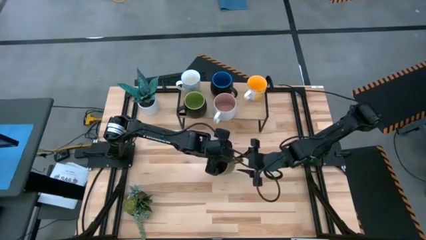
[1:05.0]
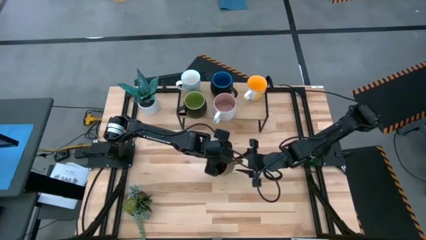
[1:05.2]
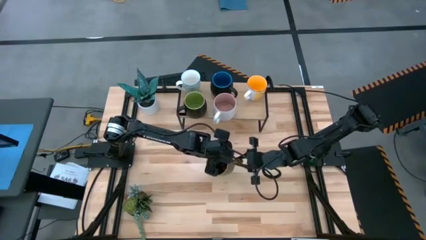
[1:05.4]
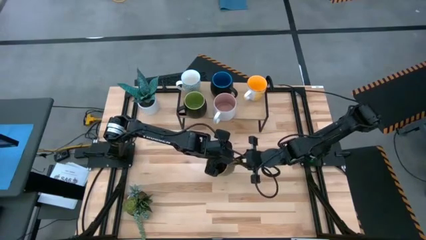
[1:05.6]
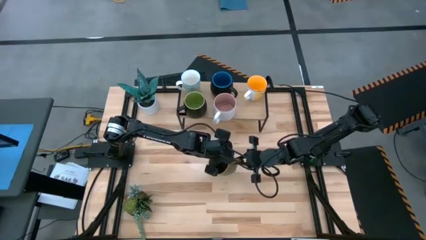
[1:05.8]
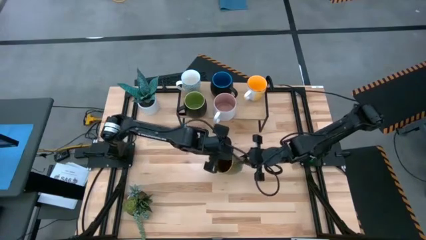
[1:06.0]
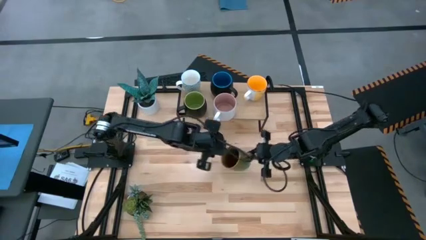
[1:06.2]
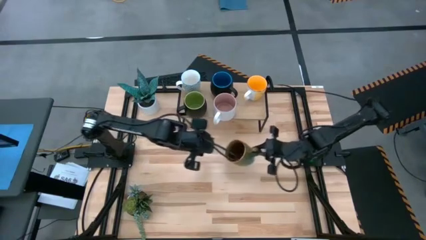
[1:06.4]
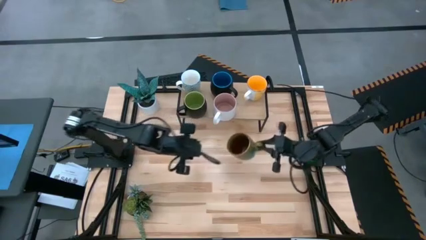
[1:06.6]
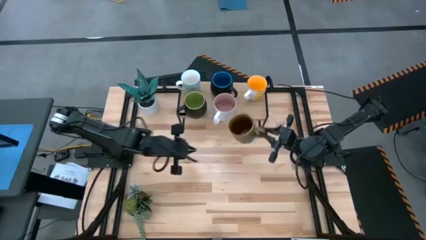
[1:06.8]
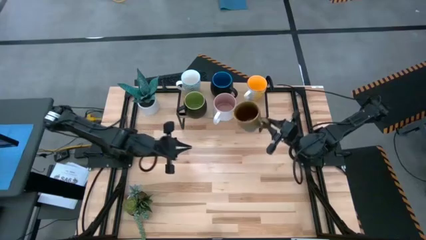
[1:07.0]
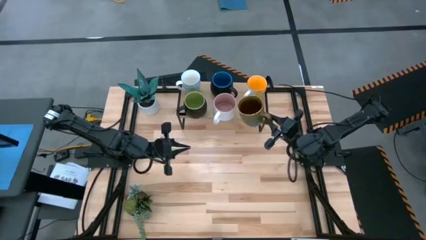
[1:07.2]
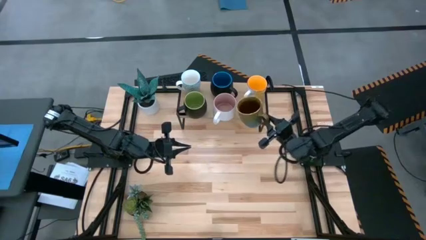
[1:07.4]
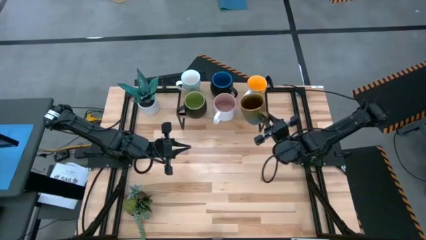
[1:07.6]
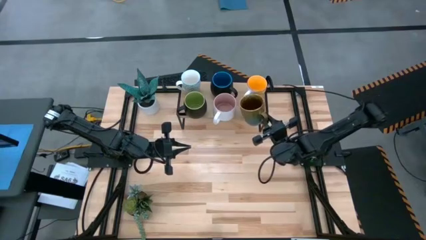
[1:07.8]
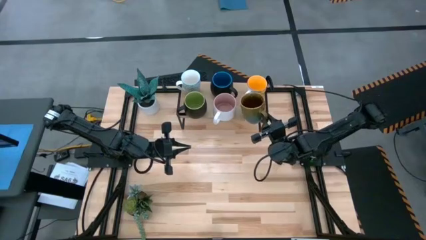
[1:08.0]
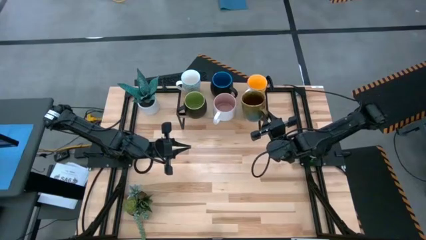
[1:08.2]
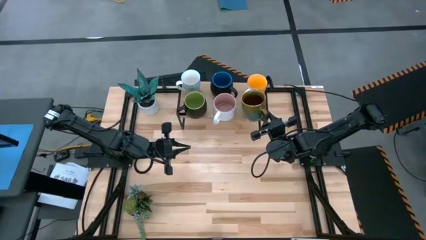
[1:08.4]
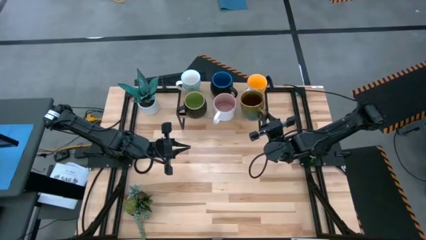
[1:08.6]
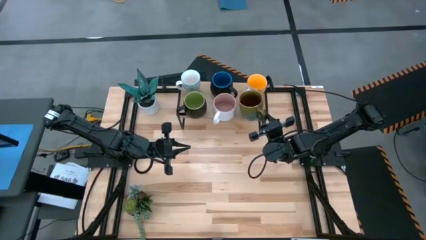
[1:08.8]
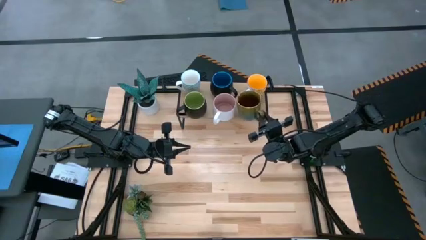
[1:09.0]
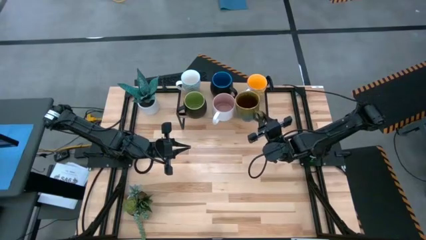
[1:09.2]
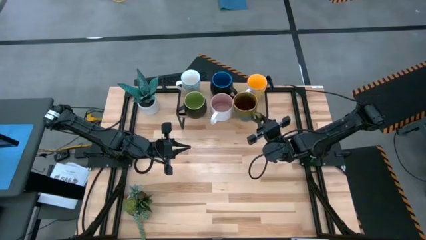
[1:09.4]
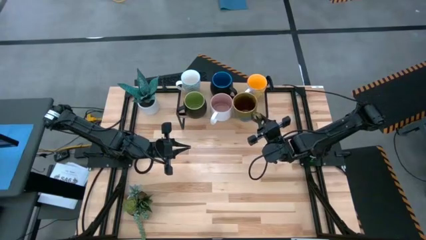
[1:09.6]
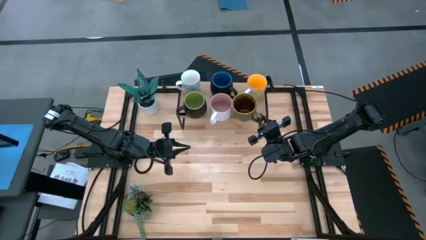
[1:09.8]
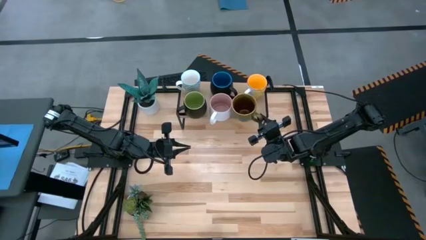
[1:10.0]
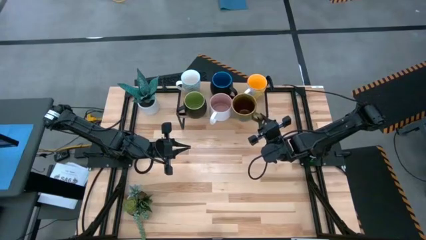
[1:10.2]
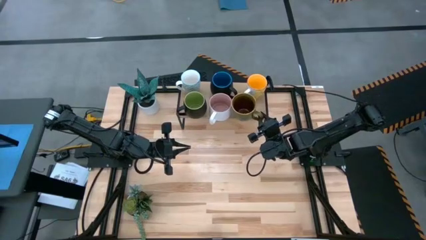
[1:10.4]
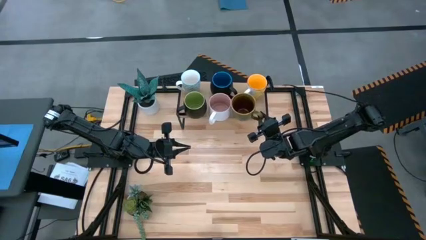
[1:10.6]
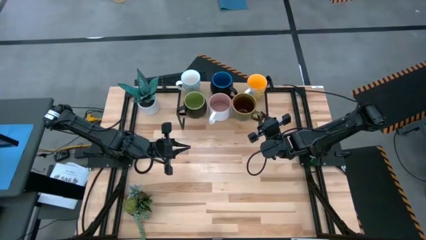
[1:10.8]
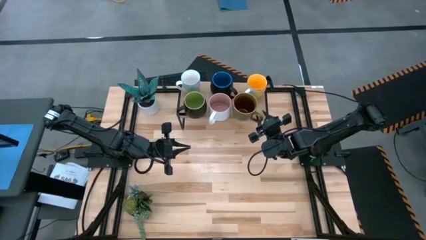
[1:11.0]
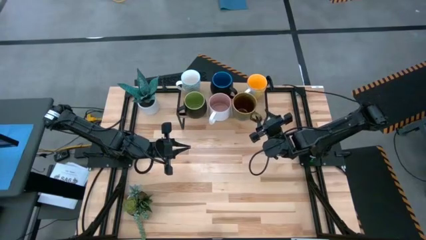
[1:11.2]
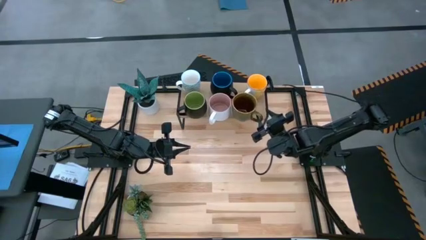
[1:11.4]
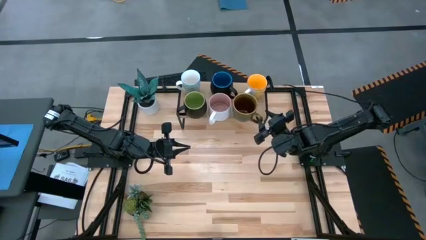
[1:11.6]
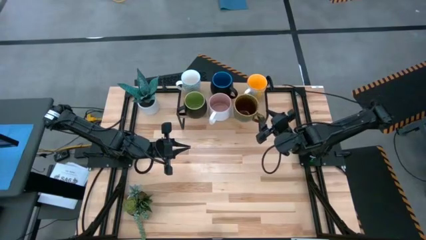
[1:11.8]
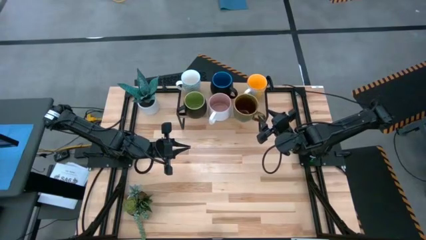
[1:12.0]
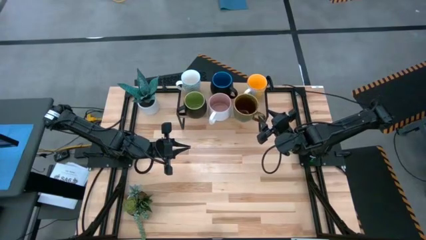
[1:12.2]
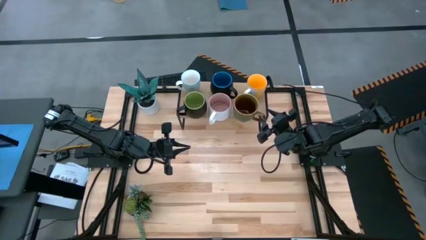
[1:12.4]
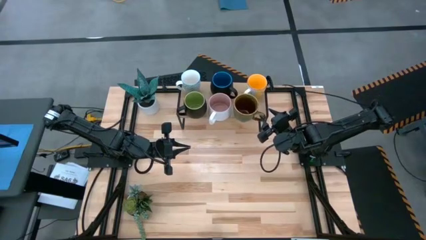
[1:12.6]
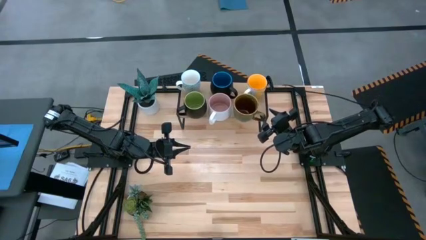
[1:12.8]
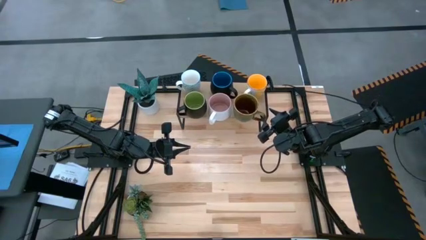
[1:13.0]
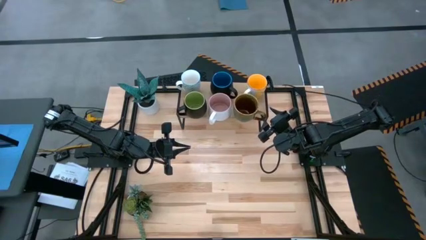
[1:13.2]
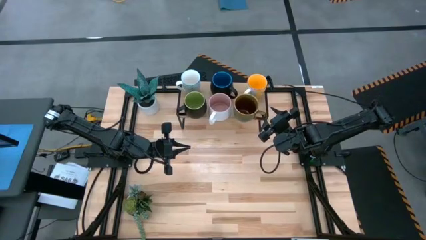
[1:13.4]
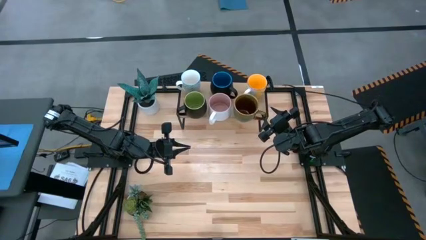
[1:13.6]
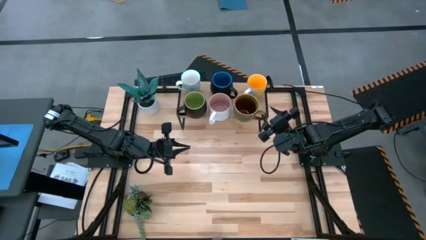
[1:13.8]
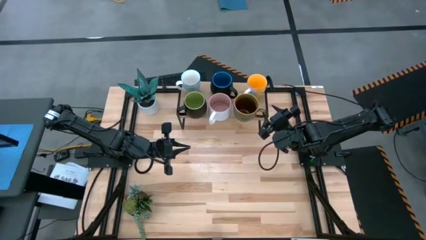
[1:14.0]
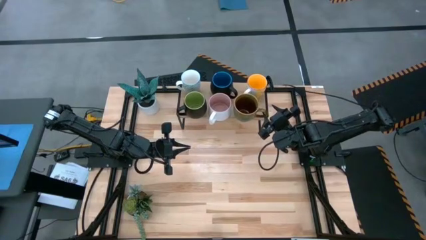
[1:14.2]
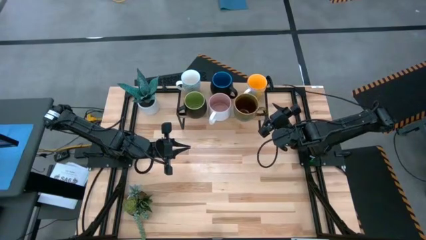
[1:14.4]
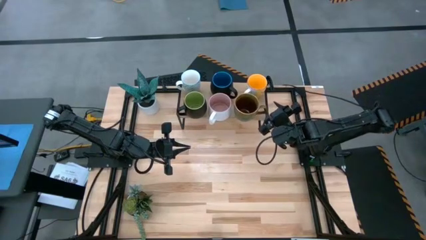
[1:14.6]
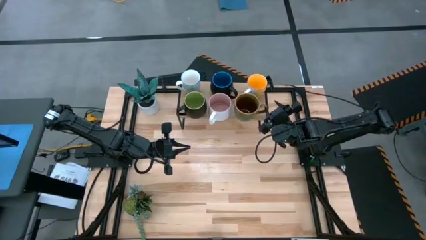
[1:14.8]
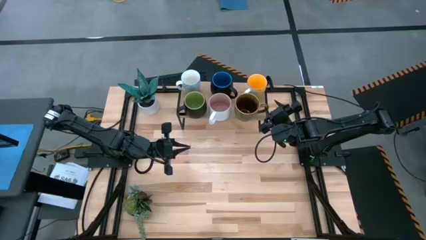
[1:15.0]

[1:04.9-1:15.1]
Task: Place coffee mugs
Put the brown mug on the shelf
